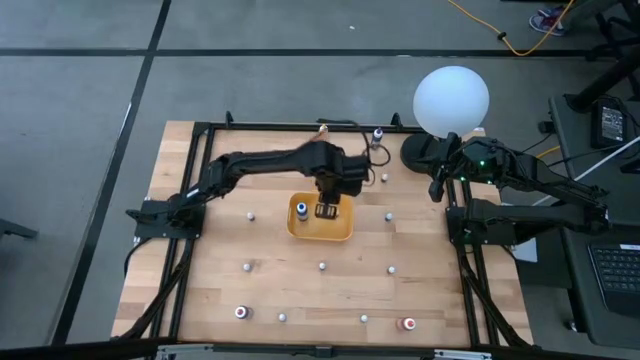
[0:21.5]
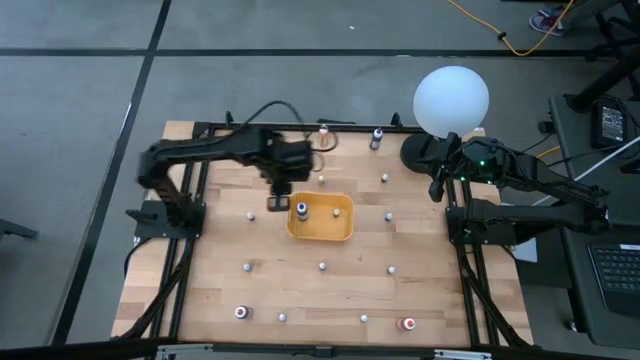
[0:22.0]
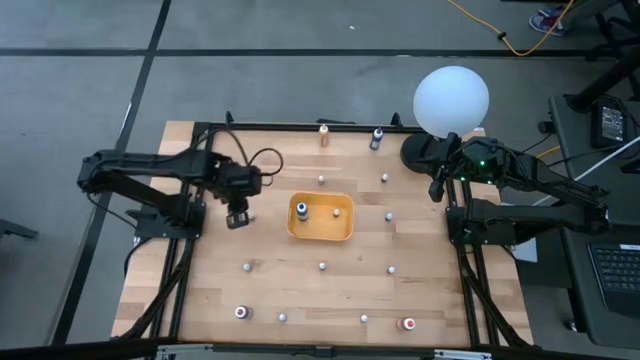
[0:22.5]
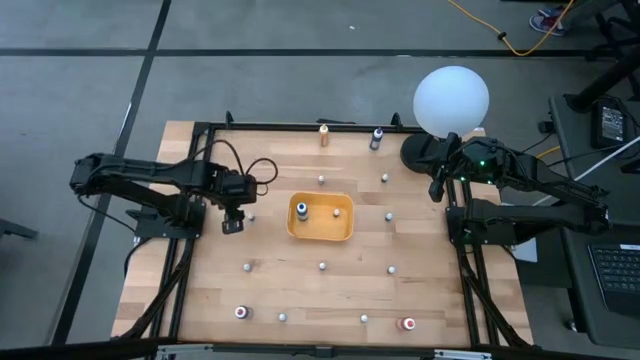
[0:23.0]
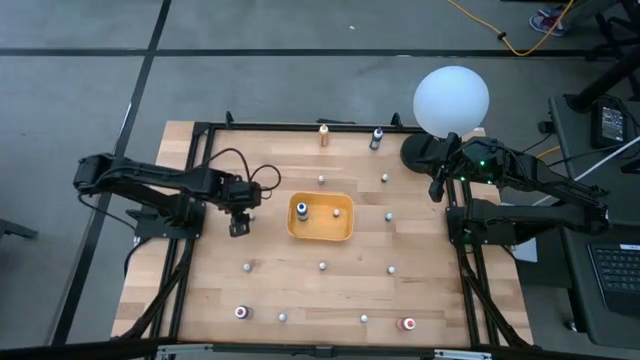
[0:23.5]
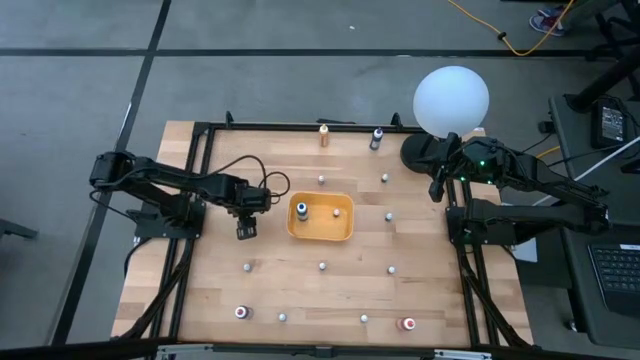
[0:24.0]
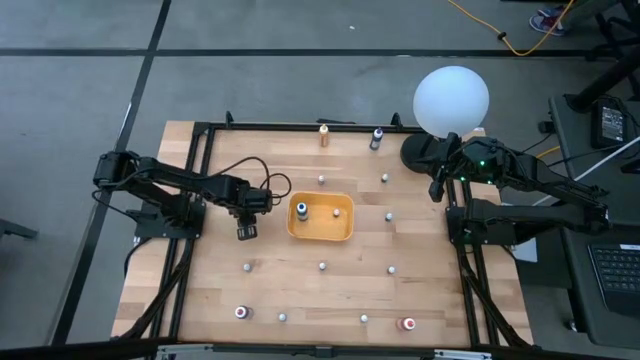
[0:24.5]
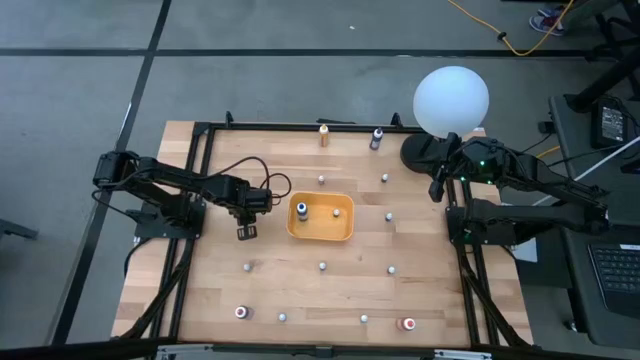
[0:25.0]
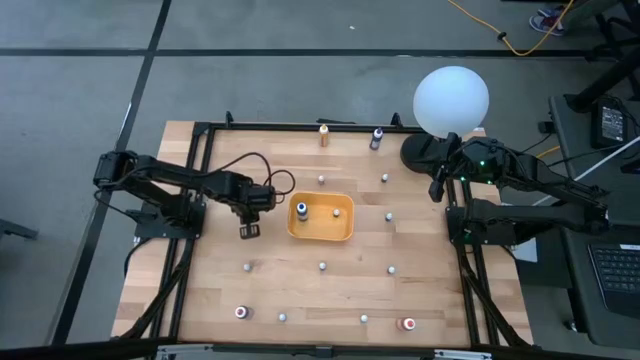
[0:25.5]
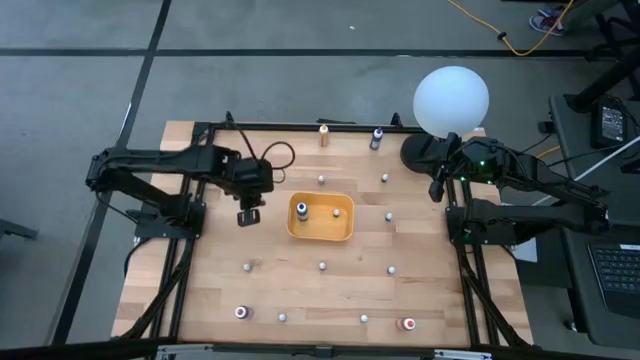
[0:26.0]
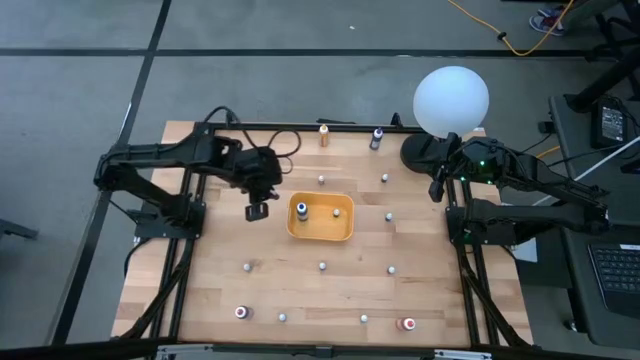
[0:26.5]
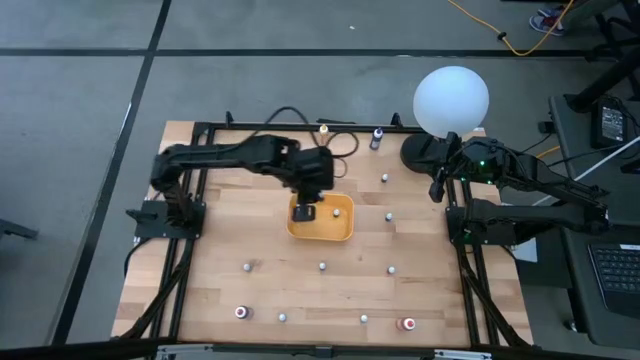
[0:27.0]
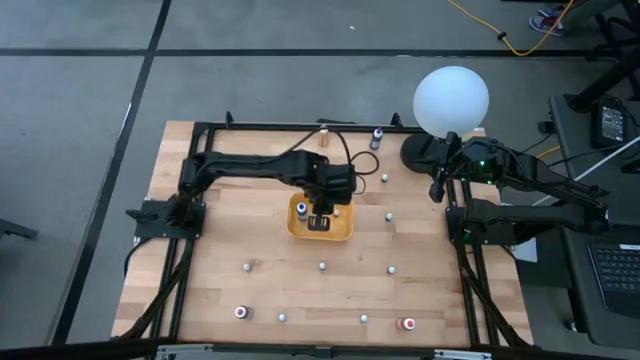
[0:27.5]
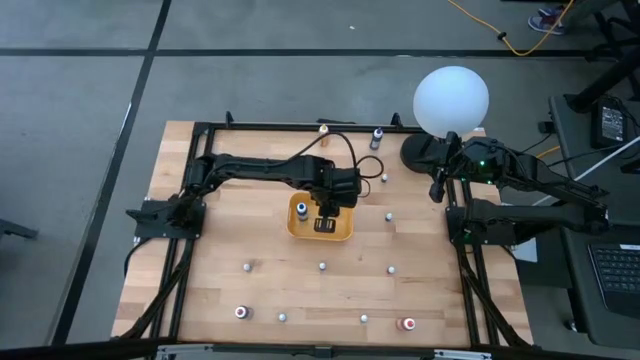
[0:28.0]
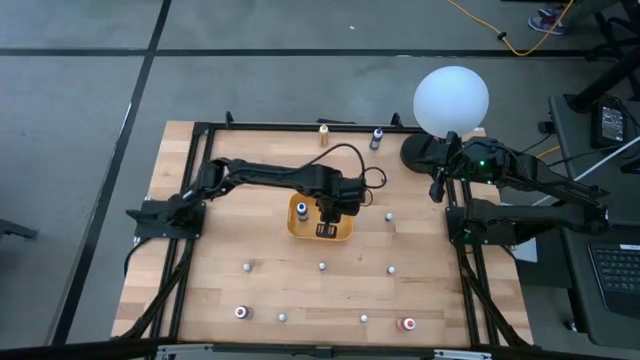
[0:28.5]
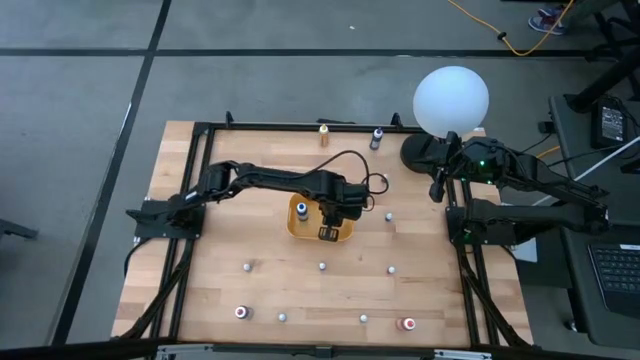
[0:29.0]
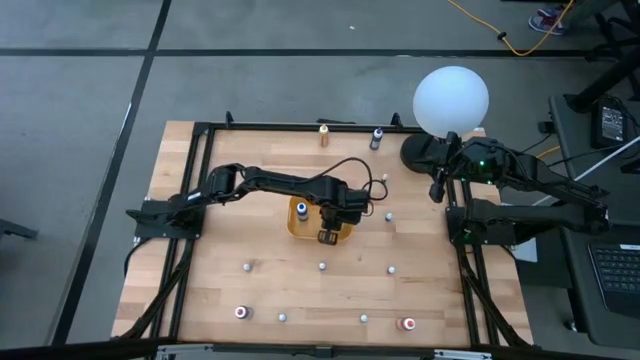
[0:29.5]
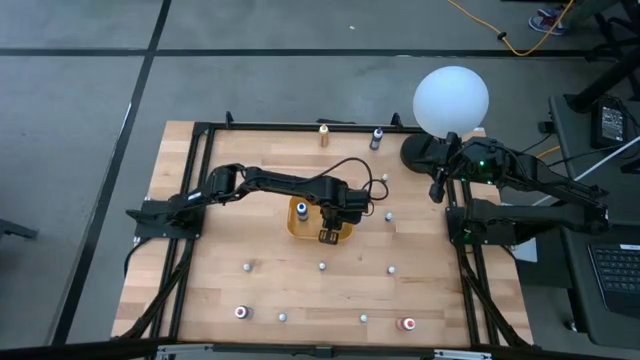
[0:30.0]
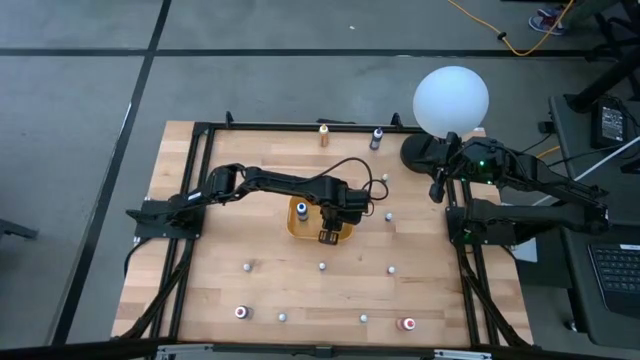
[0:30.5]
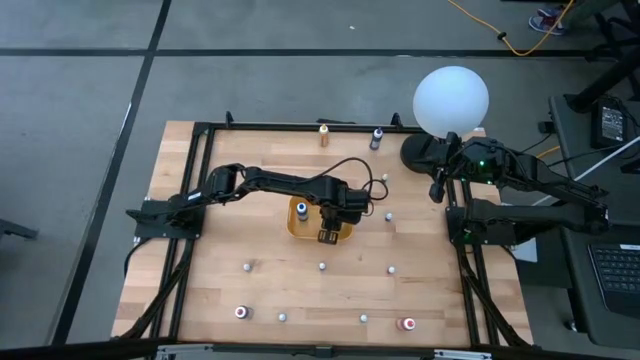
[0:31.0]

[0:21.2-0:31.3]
Task: Pick & Place food coloring
Put the black food coloring bottle into the yellow bin

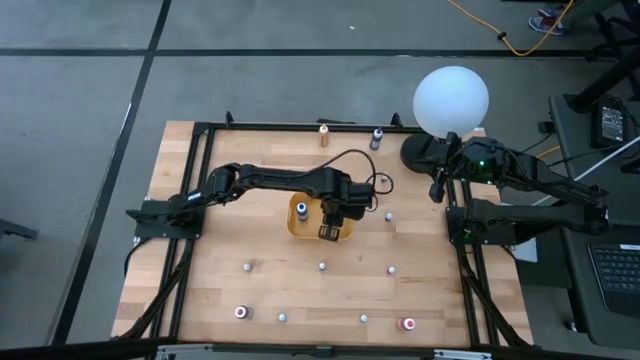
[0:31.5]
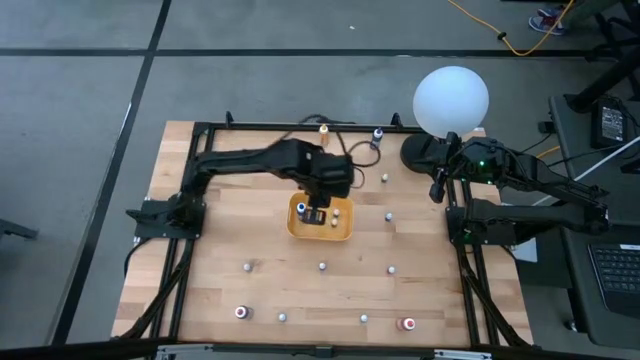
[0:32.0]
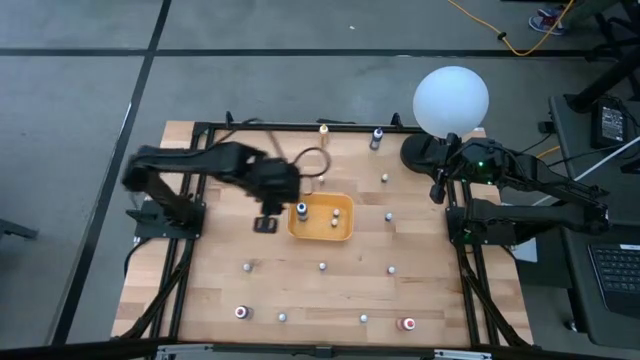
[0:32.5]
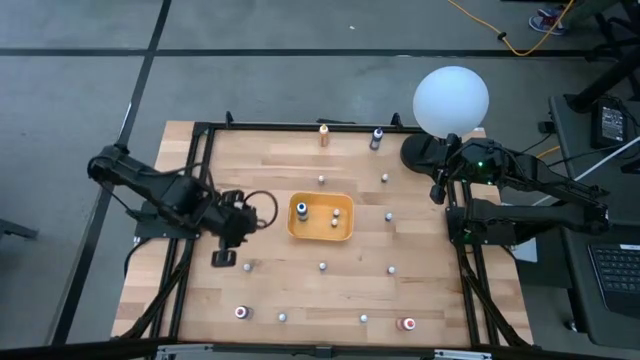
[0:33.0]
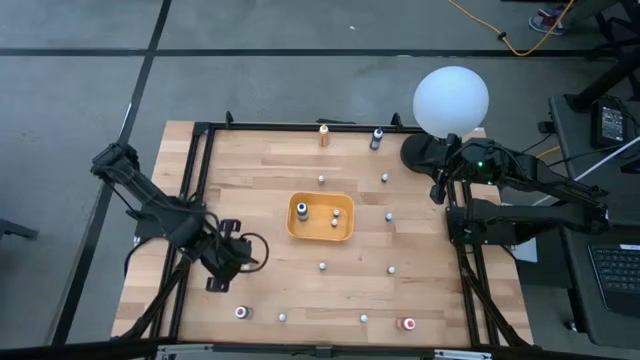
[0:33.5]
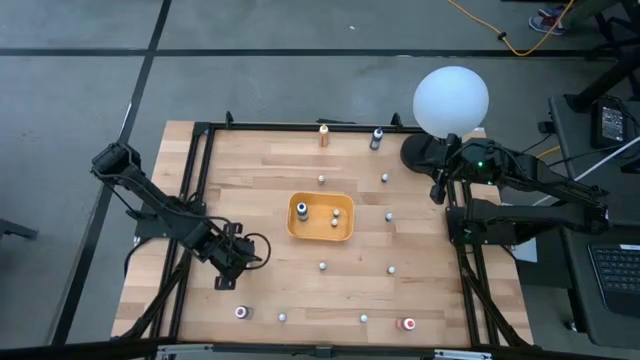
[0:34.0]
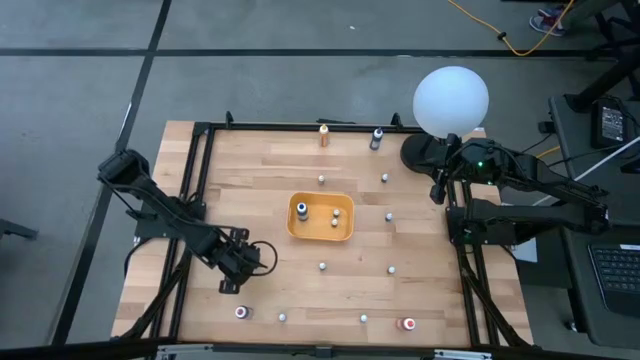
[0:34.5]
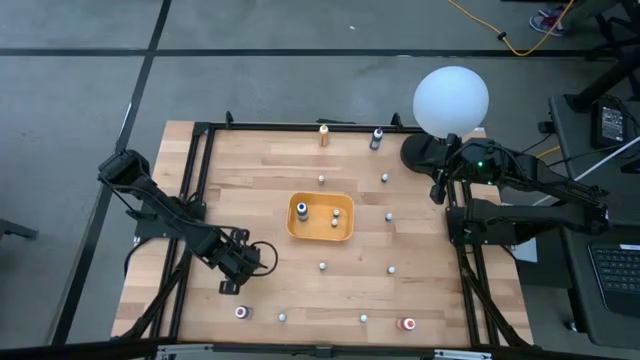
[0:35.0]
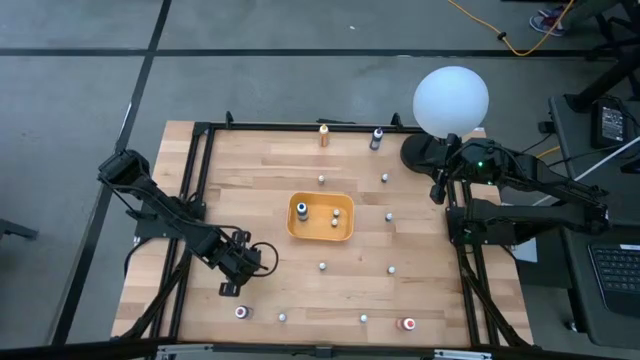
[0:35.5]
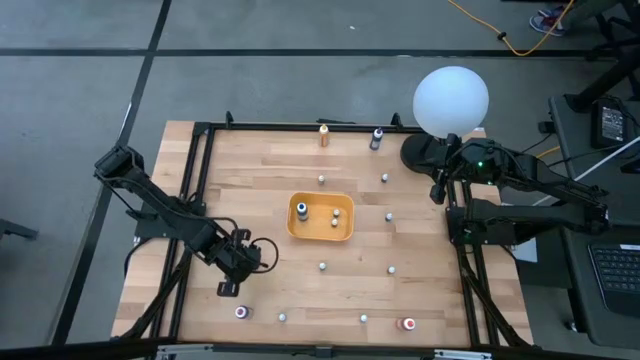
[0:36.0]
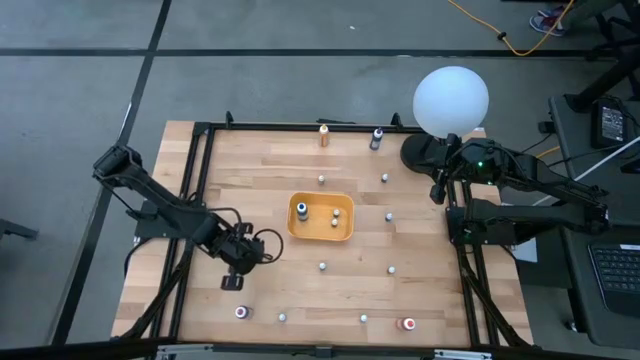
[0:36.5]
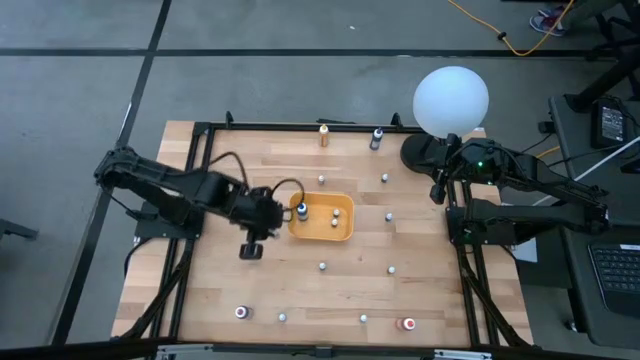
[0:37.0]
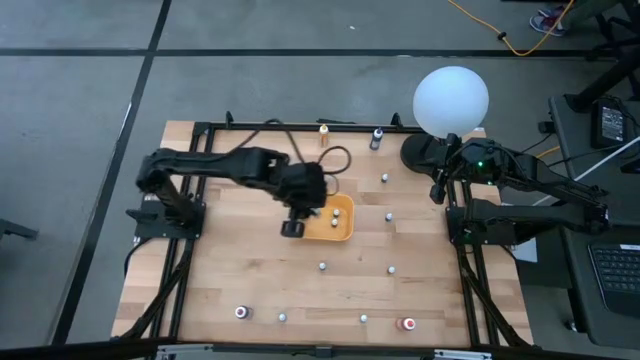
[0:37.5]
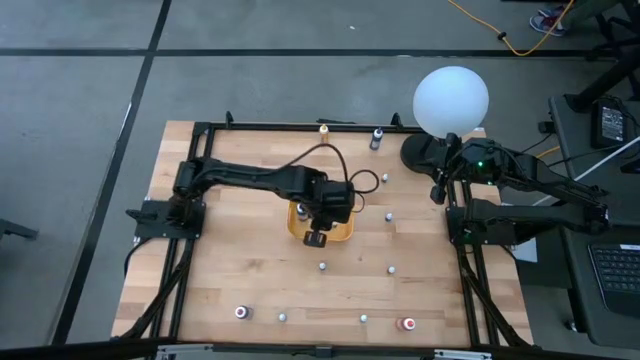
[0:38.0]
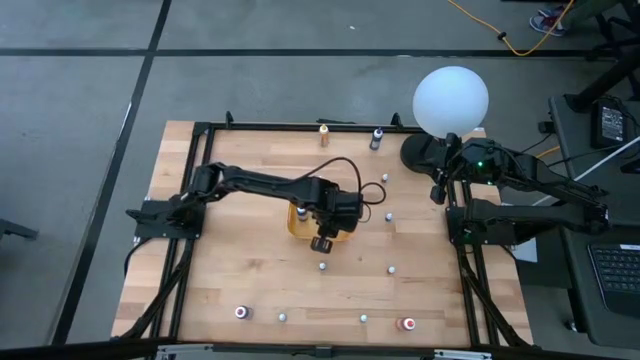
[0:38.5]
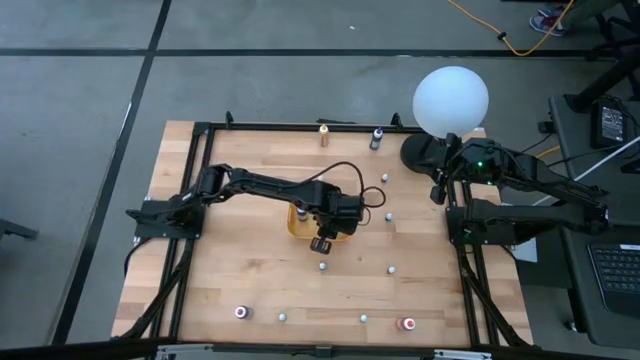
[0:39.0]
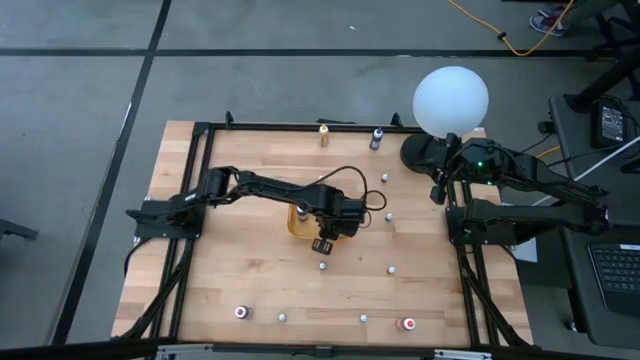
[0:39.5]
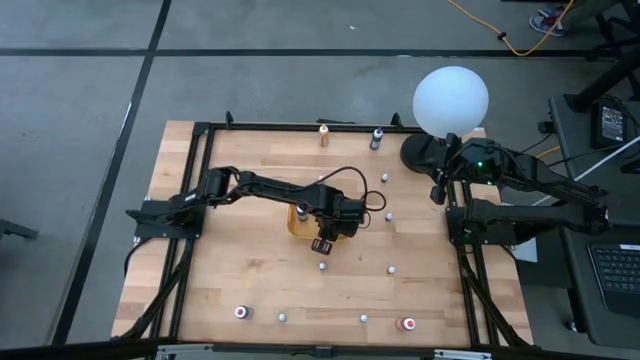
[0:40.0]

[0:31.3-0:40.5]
Put the black food coloring bottle into the yellow bin

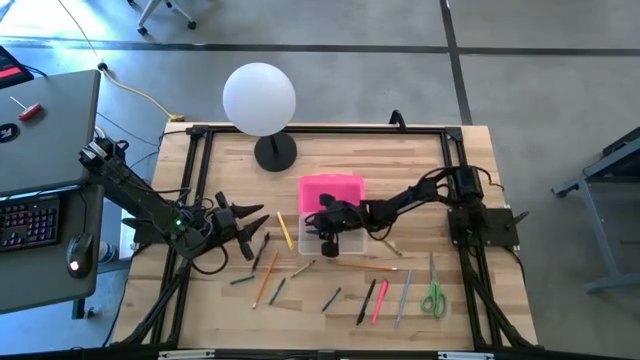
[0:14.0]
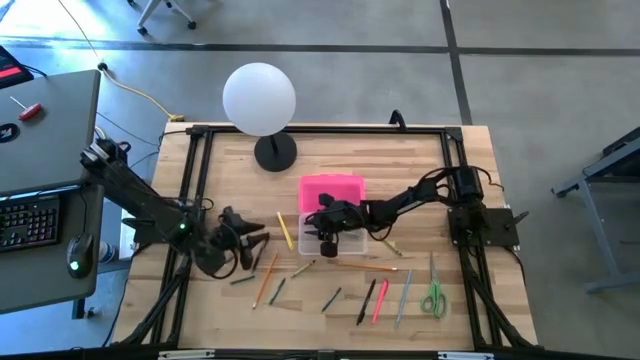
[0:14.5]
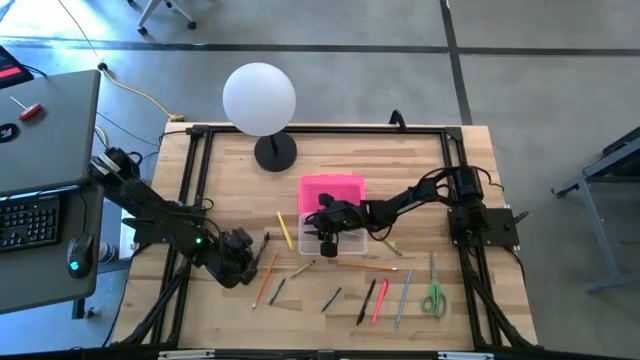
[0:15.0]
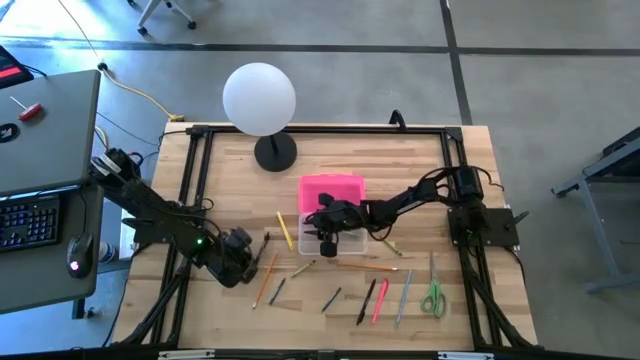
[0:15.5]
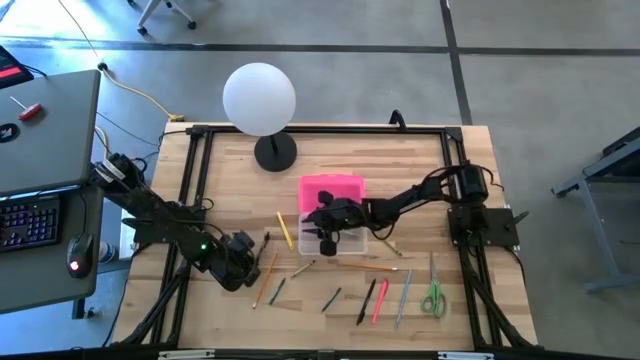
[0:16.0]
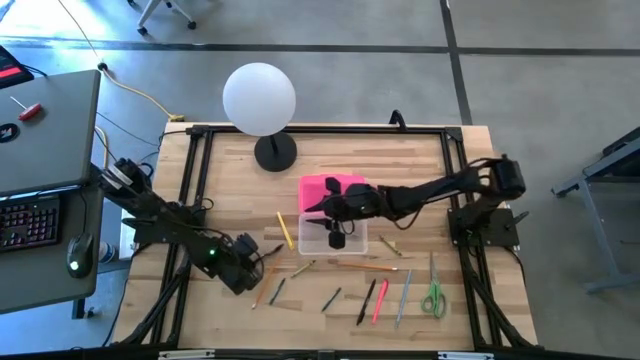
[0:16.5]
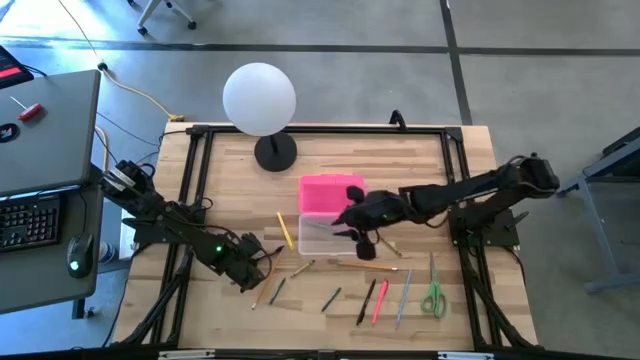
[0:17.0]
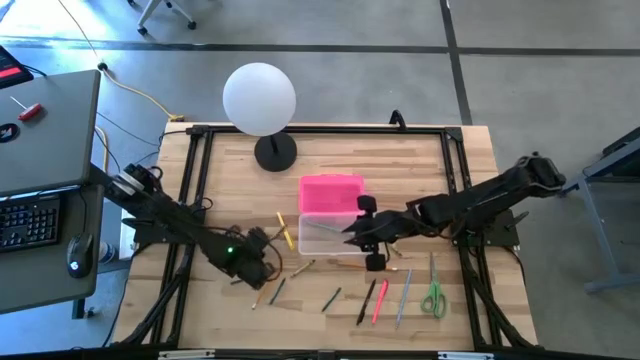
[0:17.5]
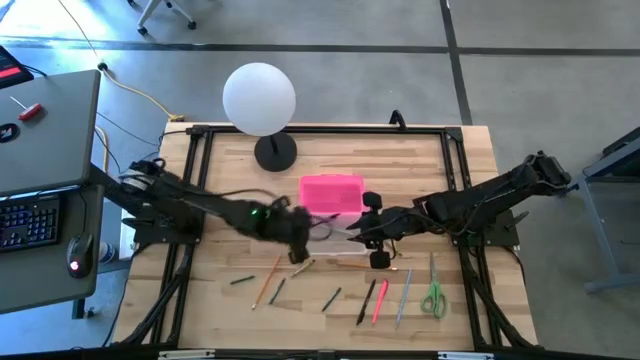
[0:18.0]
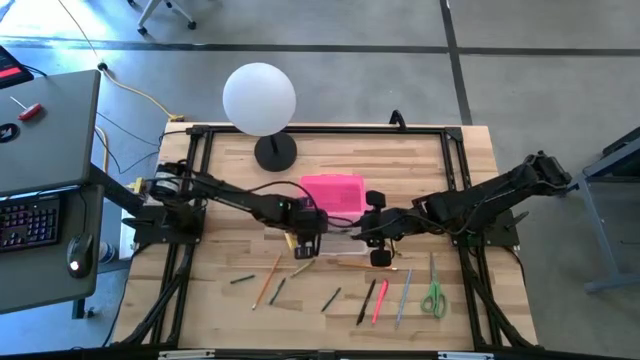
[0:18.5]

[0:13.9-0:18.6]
Task: Pick & place school supplies into a supply box
Put the black pen into the pink supply box
